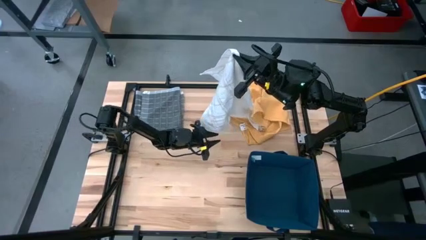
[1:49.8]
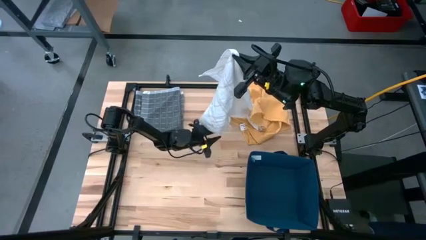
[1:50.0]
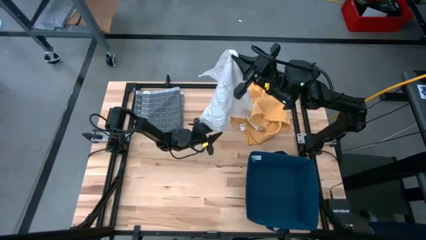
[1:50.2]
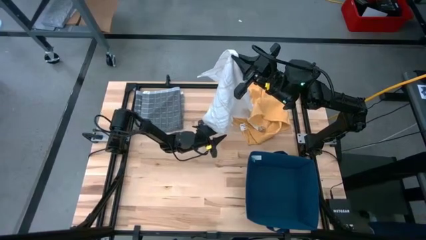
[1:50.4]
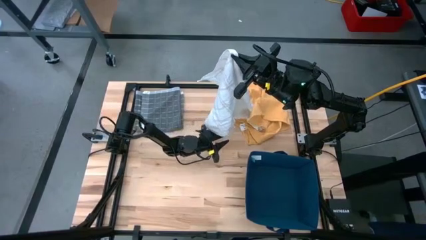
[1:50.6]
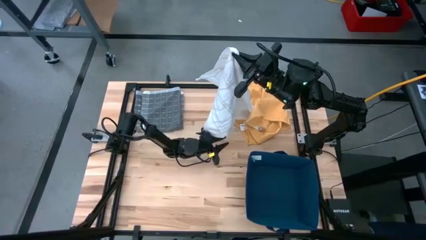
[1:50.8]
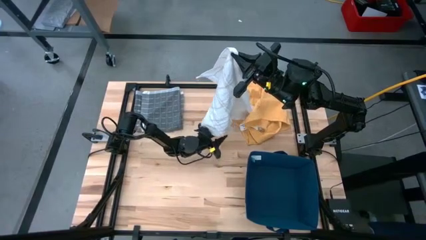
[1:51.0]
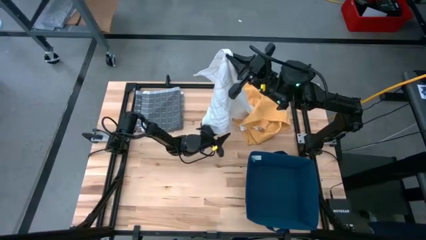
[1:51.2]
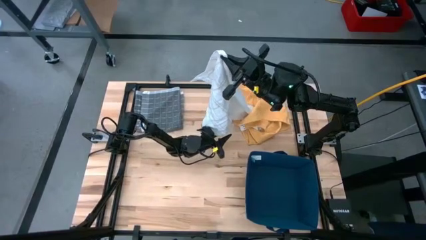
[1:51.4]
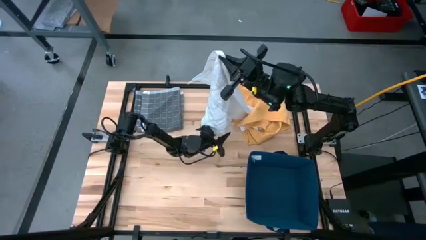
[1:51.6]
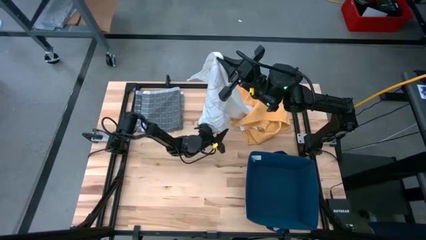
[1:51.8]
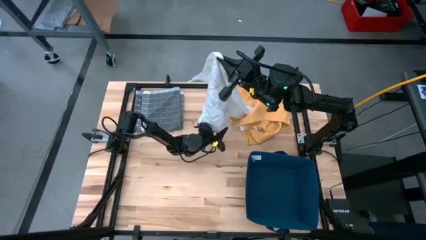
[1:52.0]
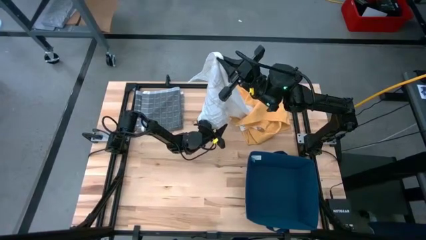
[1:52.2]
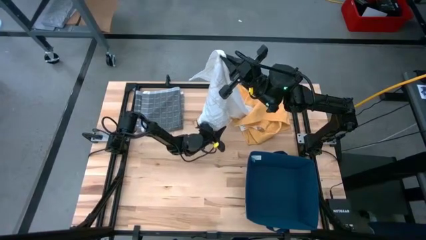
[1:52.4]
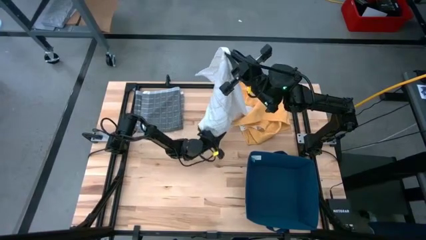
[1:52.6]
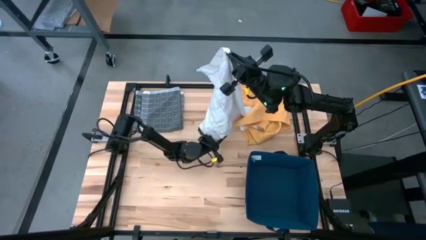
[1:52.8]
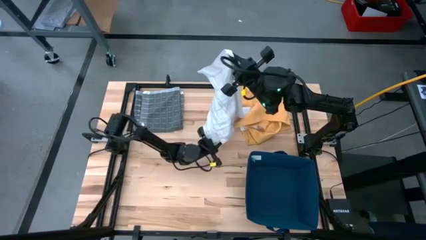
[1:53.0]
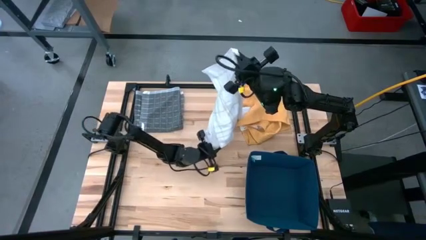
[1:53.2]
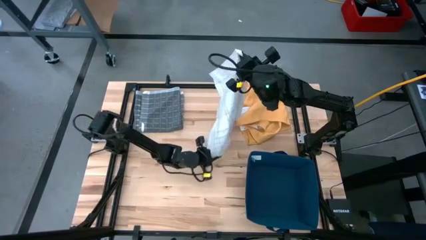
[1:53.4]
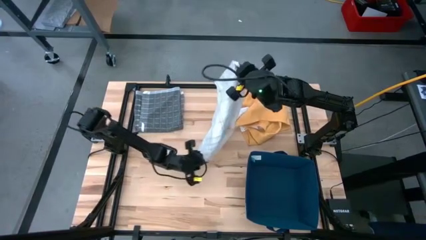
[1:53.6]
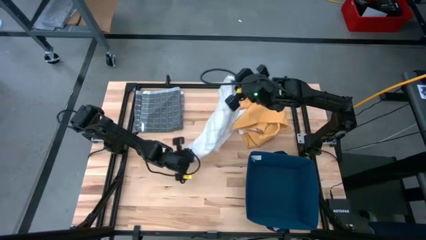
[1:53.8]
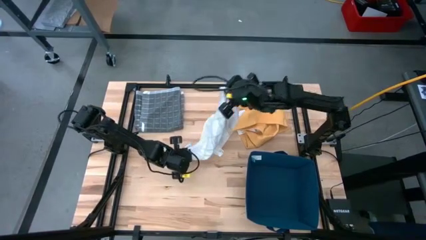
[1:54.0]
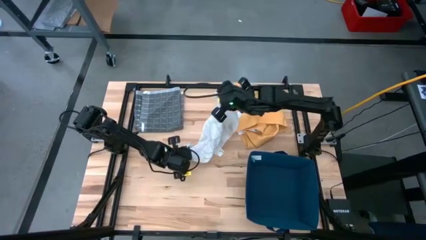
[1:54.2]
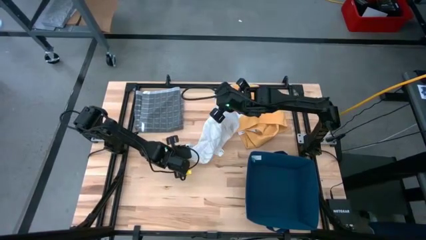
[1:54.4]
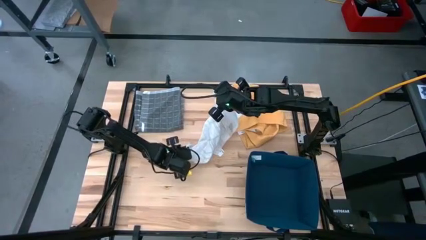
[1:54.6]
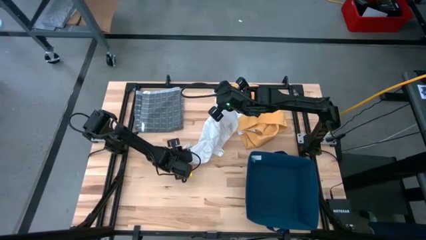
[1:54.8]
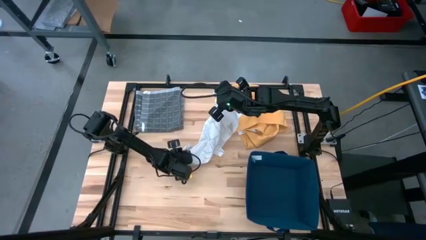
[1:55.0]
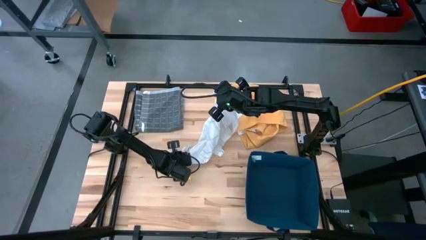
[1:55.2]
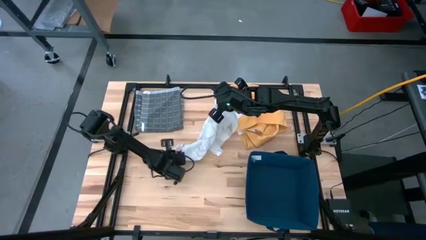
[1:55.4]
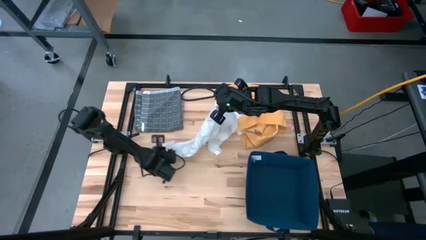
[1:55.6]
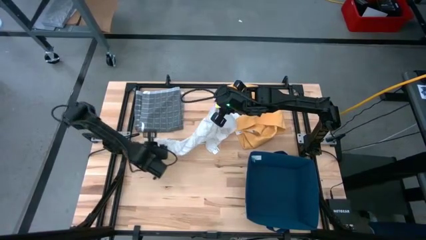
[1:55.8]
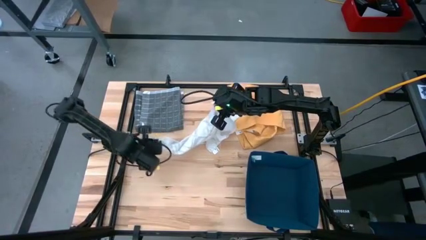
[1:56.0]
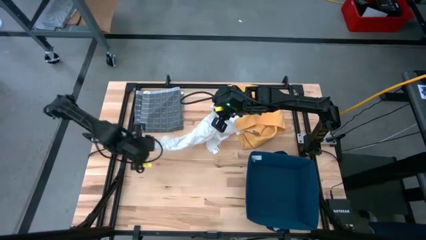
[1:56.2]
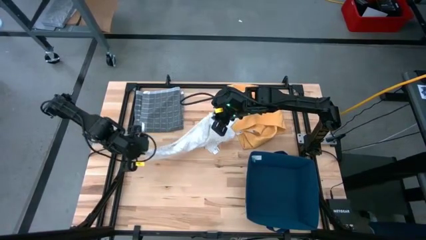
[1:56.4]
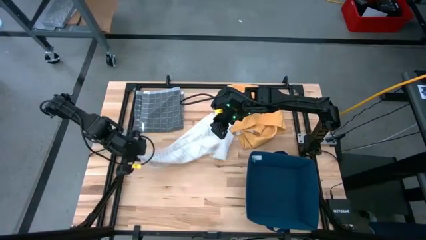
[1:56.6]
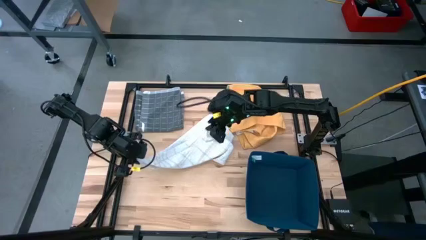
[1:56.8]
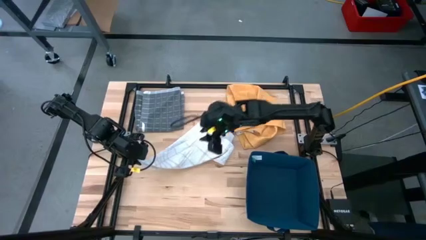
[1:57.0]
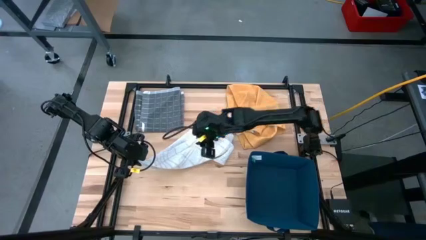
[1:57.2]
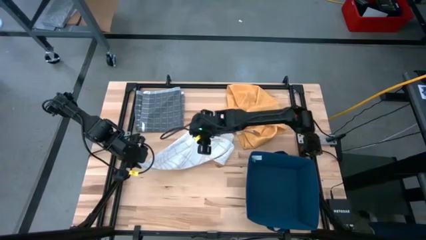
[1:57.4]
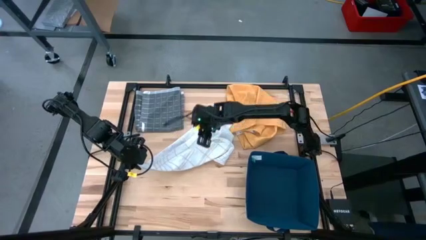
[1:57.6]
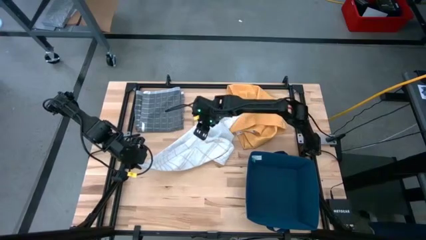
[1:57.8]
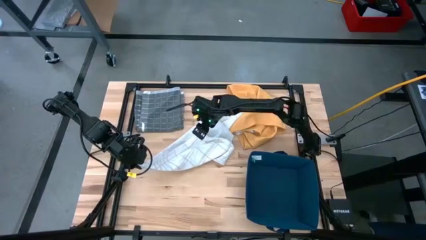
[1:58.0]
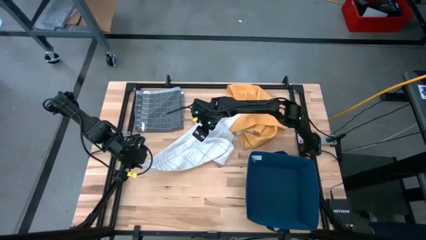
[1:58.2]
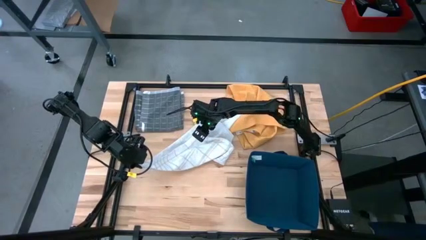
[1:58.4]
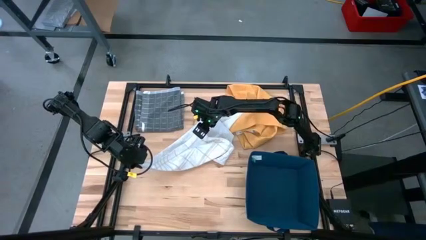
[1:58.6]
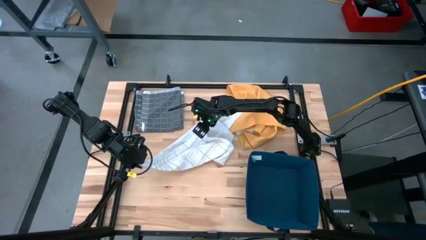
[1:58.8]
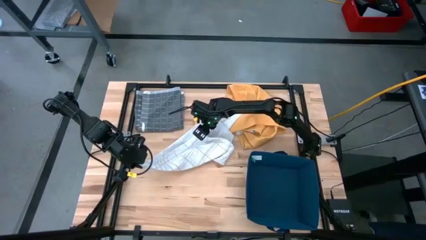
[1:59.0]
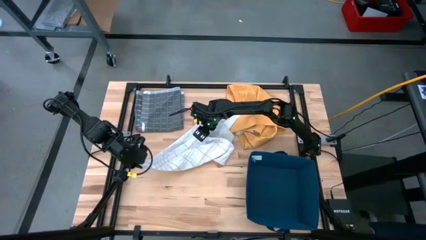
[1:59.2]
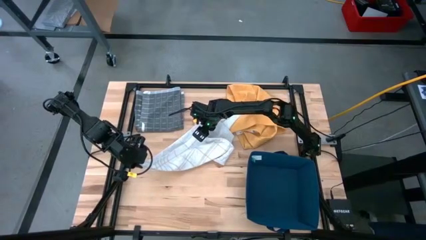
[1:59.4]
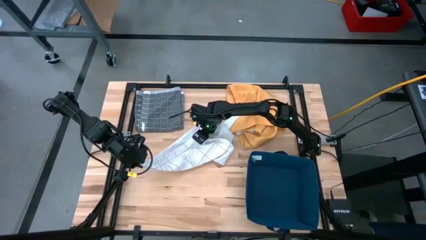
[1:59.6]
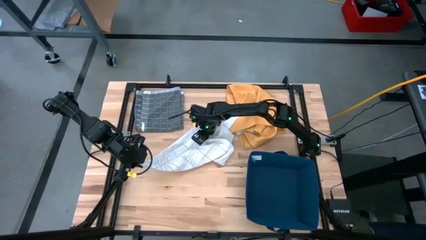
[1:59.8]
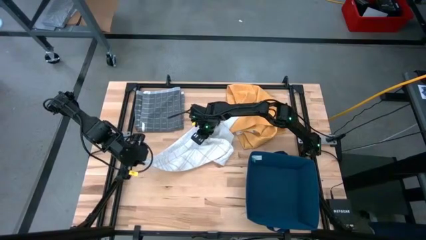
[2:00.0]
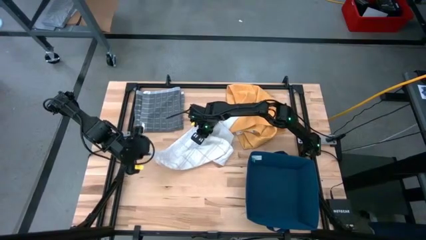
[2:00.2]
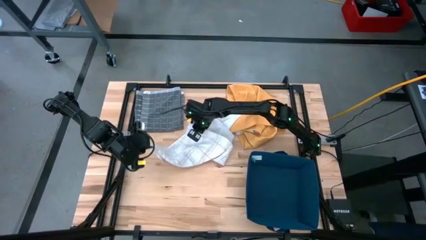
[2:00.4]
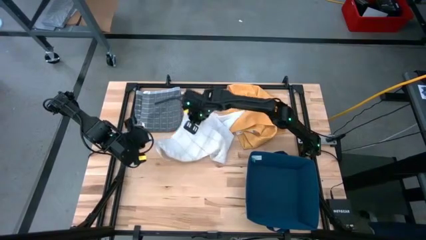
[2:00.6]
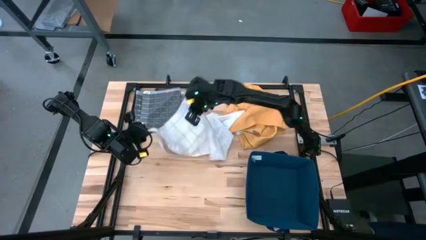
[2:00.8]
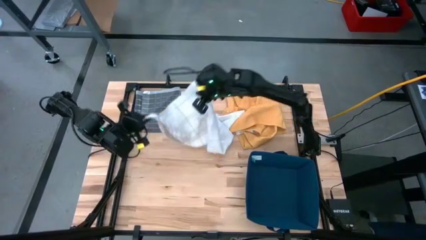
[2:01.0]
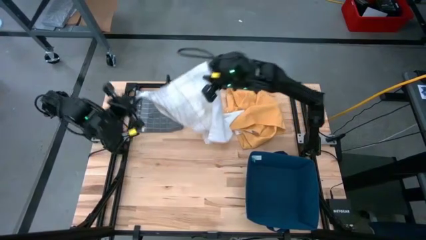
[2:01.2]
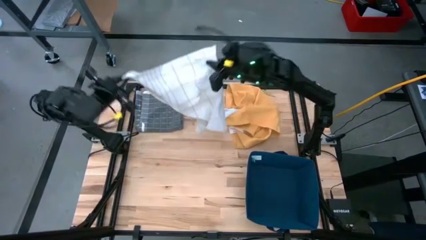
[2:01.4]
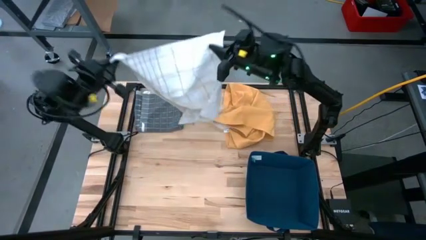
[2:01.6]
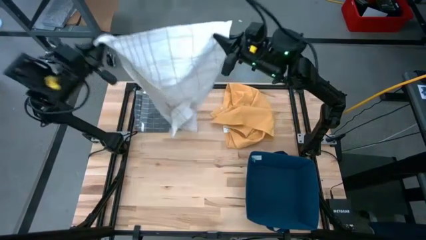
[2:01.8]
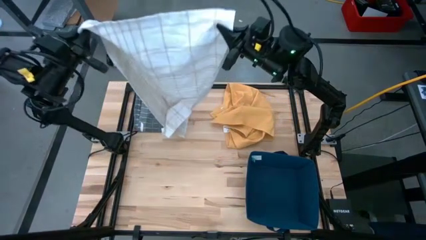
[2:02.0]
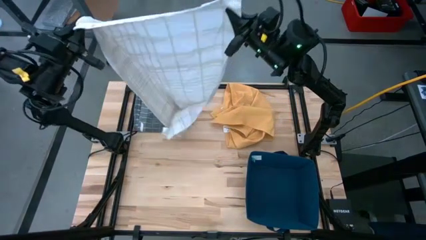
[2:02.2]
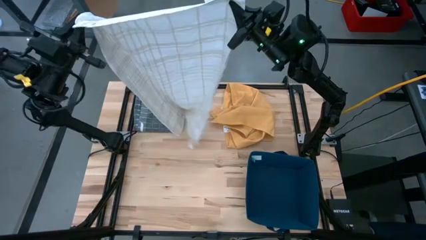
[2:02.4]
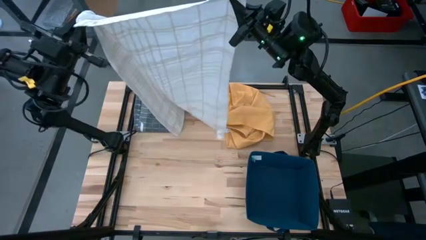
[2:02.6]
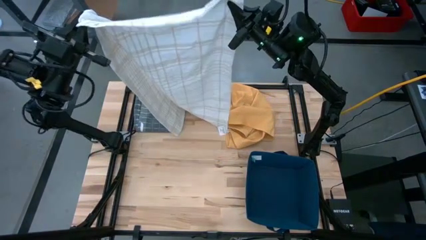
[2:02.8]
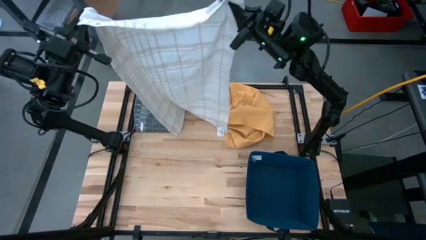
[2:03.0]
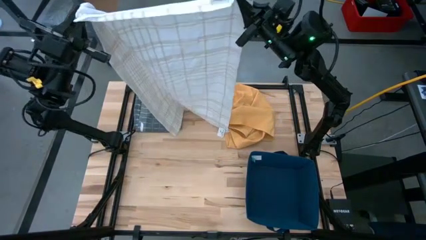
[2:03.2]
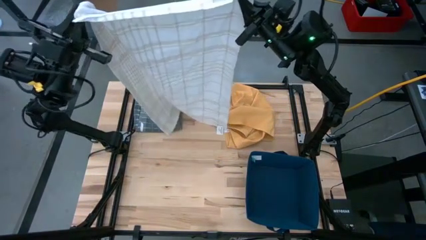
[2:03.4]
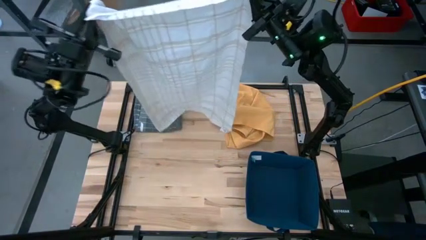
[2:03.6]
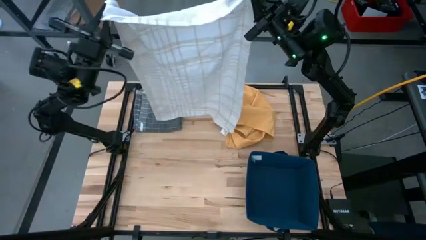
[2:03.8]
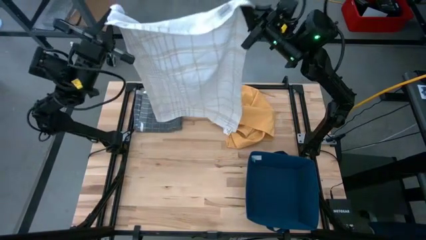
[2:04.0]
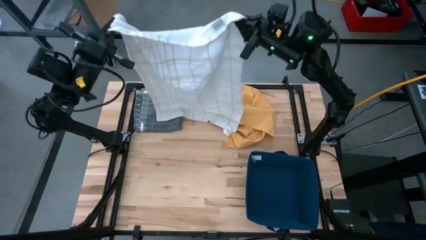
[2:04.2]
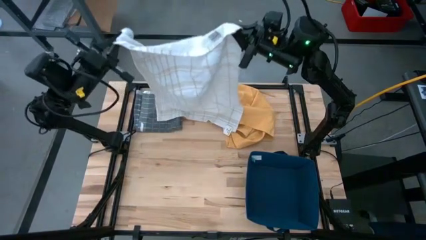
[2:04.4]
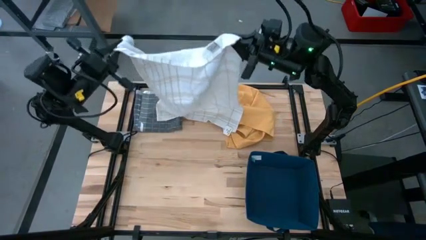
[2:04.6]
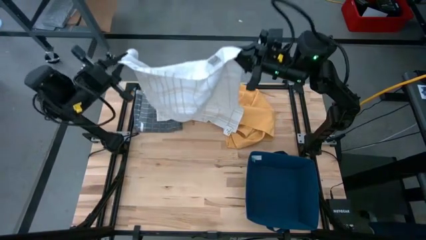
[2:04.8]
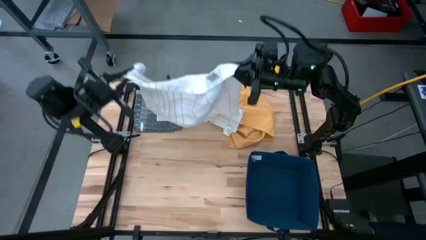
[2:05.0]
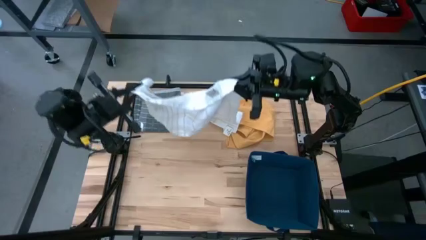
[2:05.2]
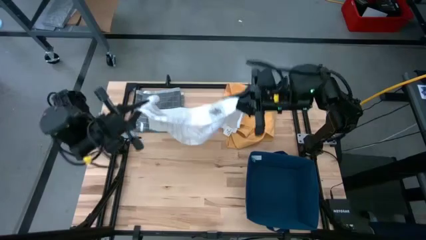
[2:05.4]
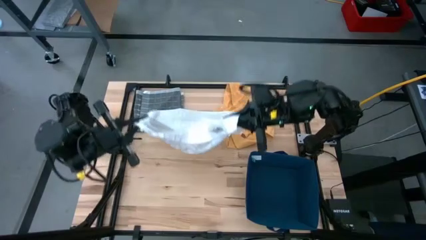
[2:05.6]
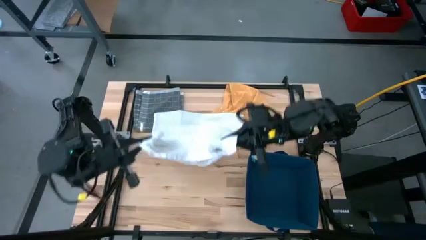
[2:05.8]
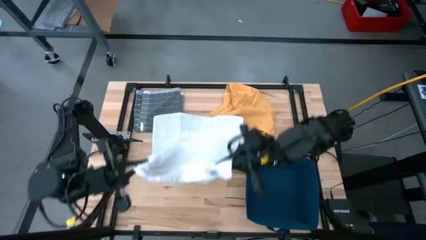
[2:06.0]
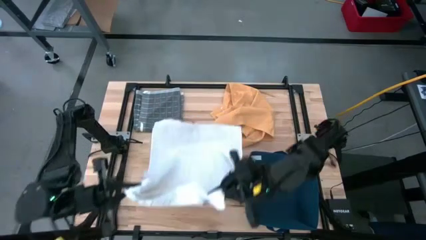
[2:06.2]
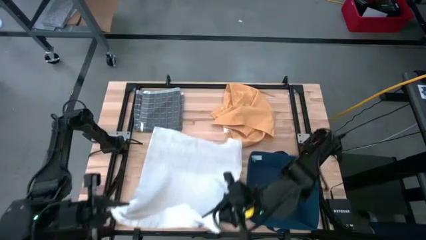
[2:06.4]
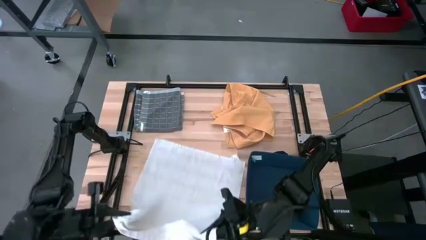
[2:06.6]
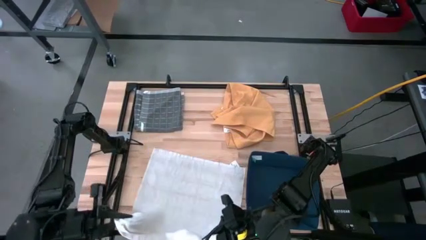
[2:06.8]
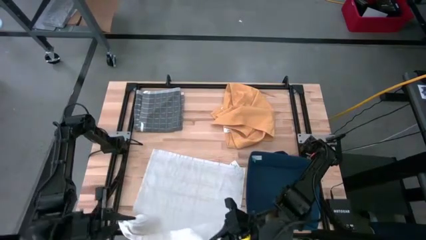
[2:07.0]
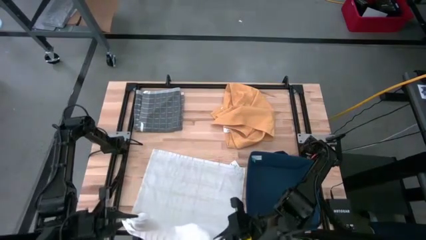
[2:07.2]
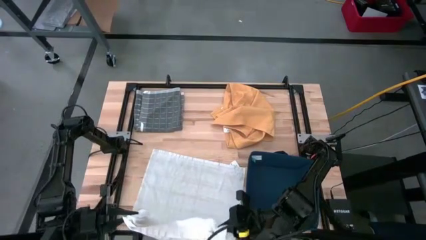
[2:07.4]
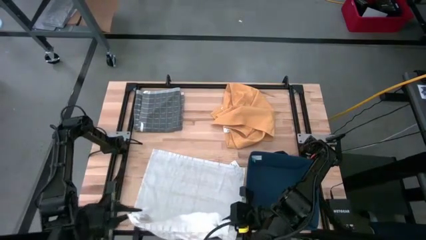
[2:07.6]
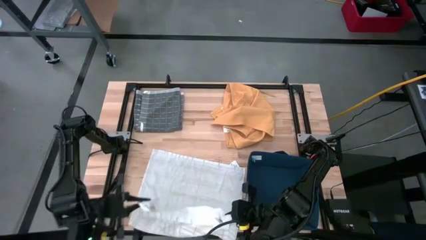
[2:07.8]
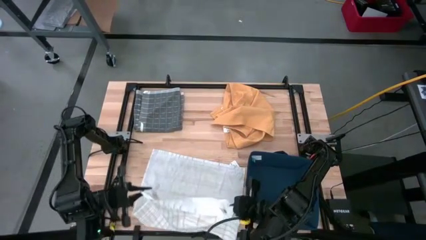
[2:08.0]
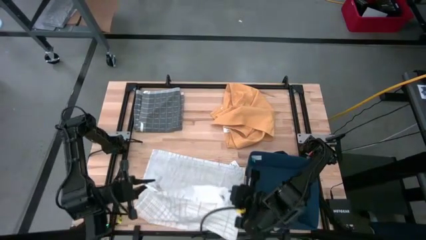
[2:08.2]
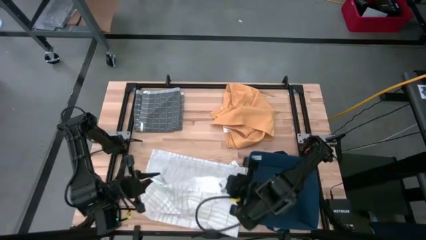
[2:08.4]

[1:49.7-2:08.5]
Task: Fold towel
Fold the white towel
